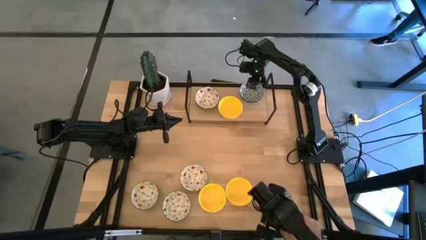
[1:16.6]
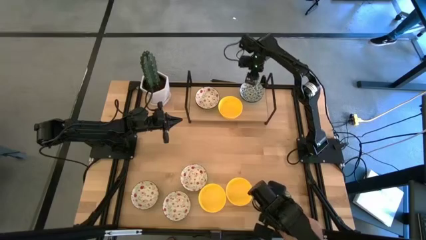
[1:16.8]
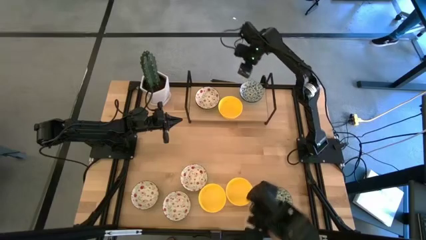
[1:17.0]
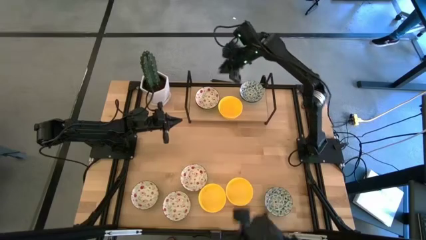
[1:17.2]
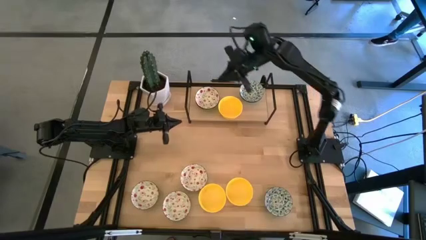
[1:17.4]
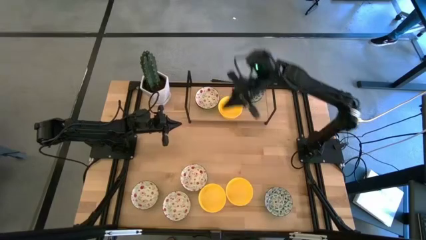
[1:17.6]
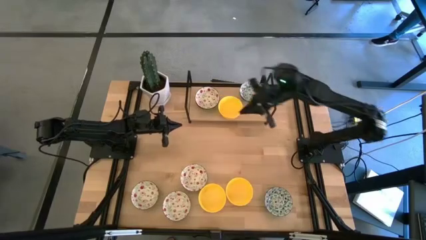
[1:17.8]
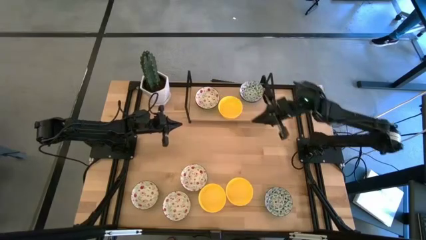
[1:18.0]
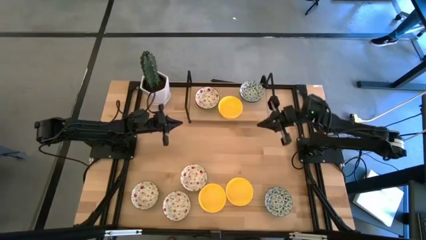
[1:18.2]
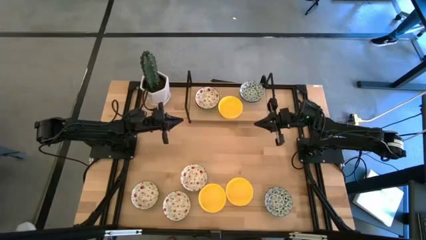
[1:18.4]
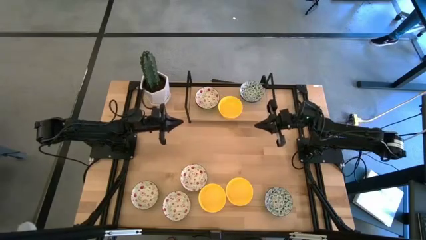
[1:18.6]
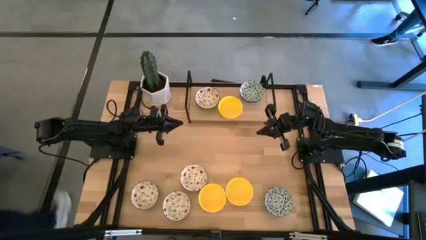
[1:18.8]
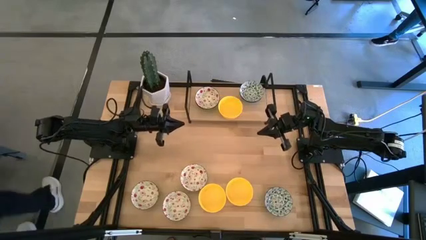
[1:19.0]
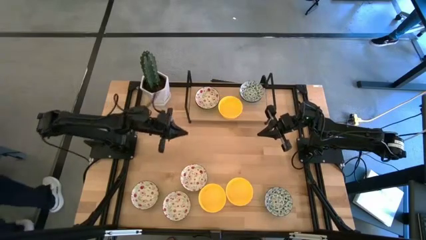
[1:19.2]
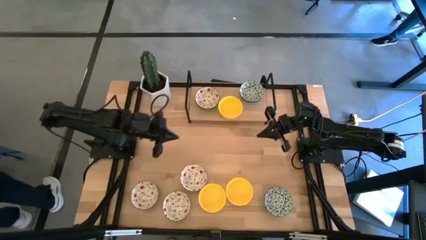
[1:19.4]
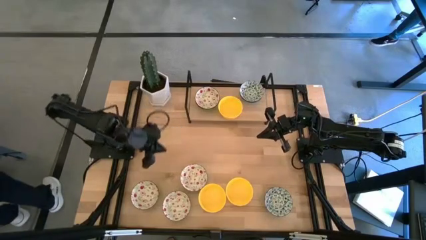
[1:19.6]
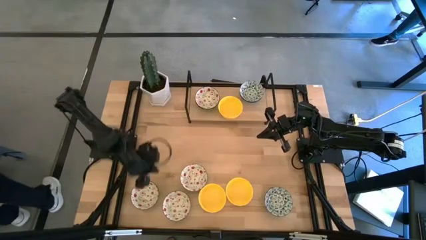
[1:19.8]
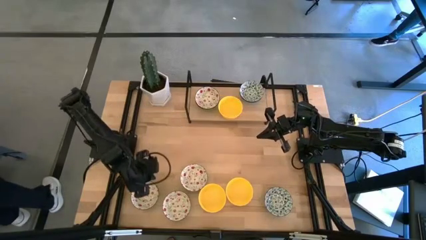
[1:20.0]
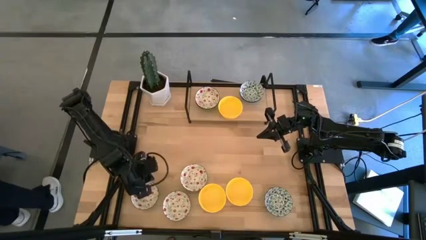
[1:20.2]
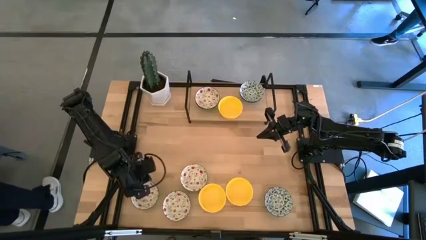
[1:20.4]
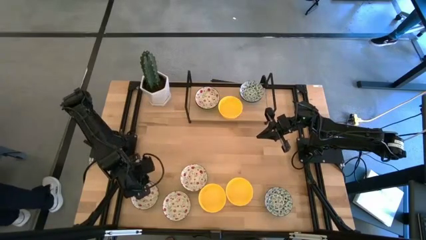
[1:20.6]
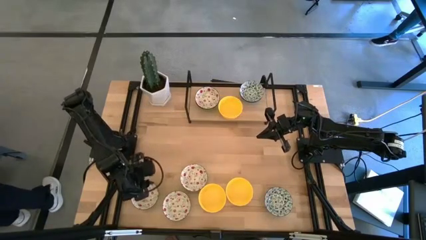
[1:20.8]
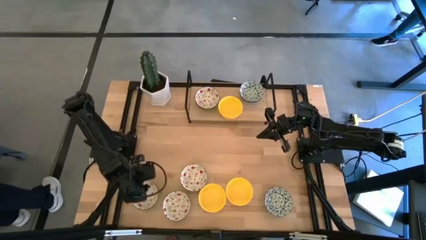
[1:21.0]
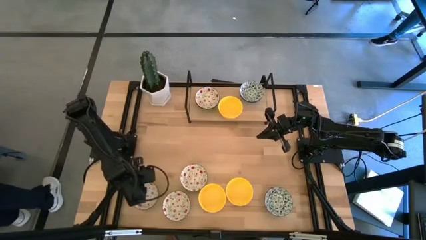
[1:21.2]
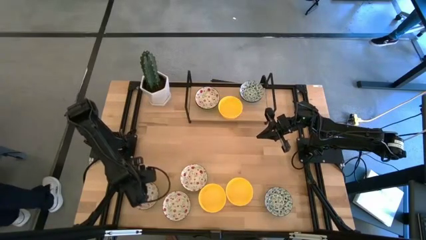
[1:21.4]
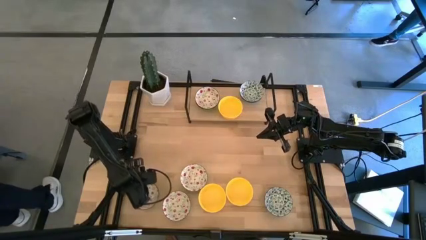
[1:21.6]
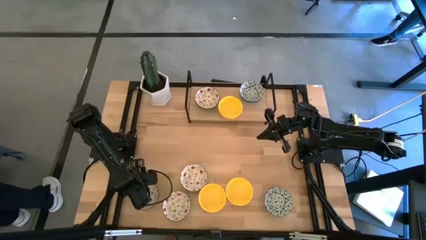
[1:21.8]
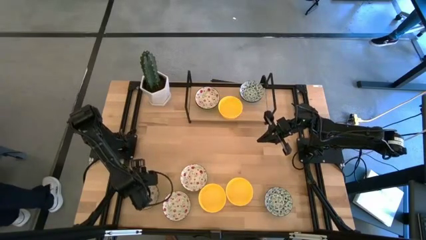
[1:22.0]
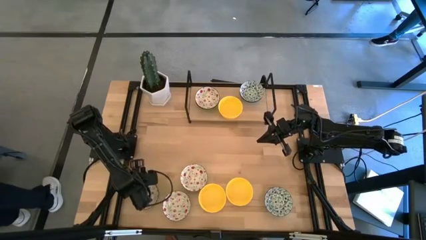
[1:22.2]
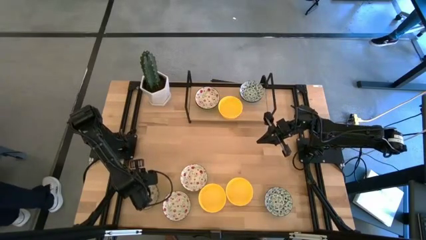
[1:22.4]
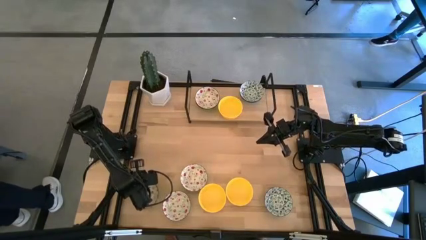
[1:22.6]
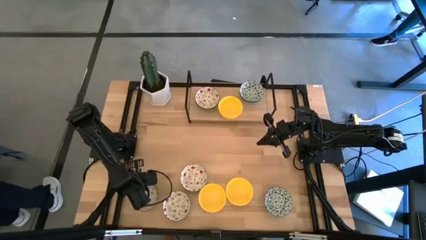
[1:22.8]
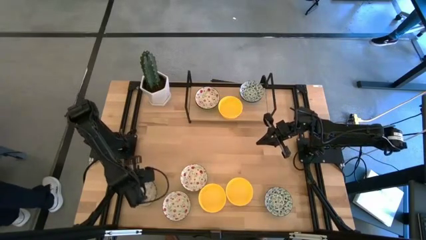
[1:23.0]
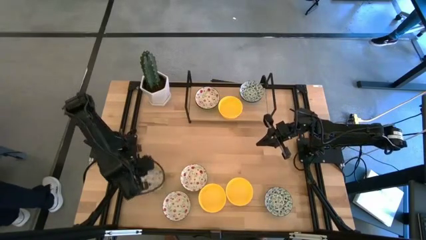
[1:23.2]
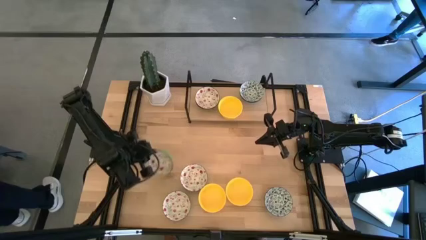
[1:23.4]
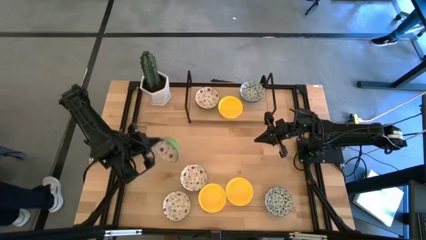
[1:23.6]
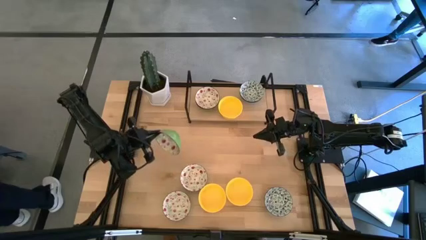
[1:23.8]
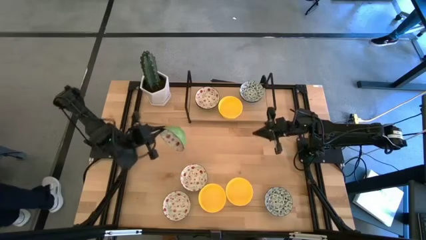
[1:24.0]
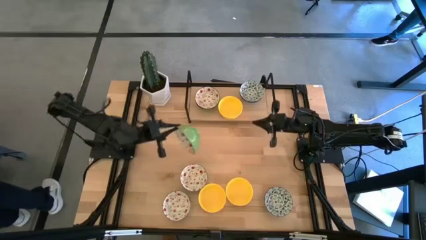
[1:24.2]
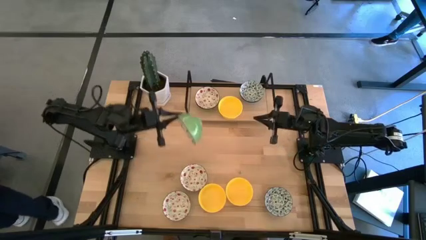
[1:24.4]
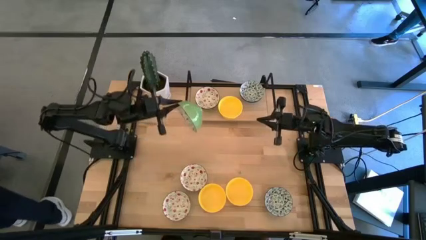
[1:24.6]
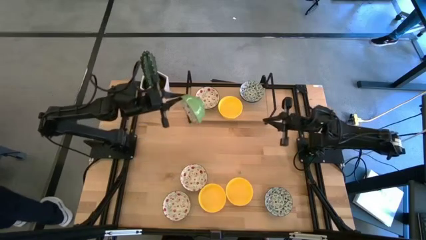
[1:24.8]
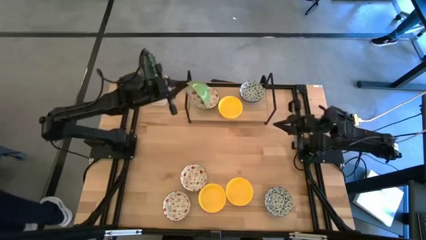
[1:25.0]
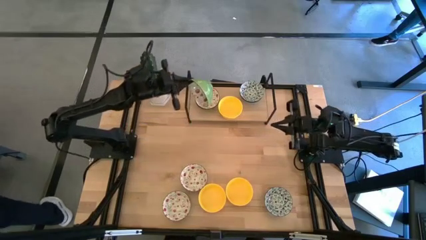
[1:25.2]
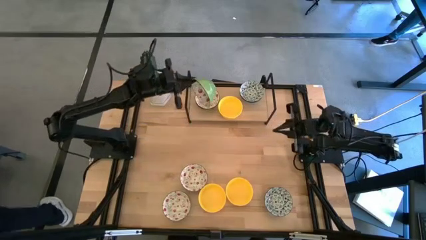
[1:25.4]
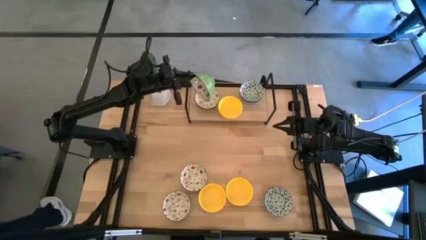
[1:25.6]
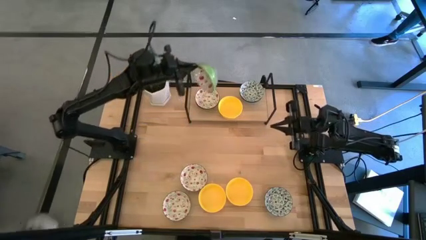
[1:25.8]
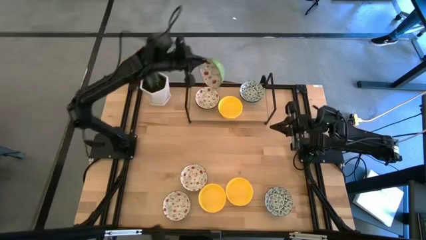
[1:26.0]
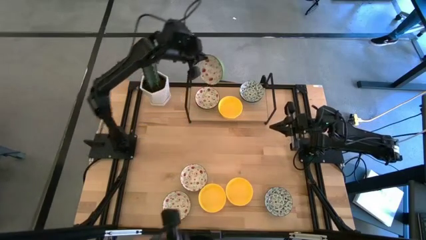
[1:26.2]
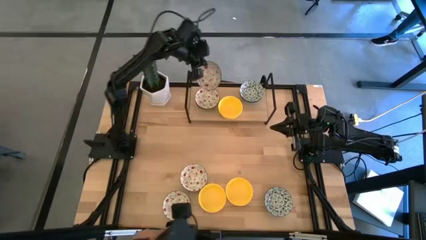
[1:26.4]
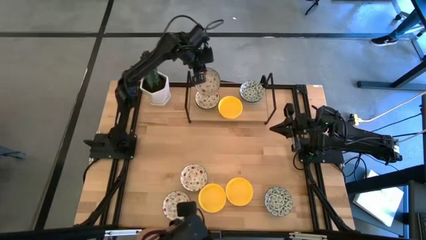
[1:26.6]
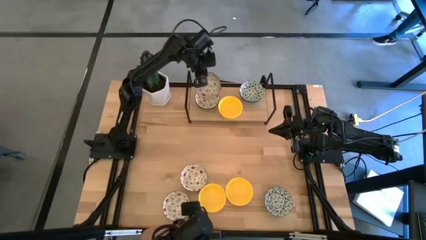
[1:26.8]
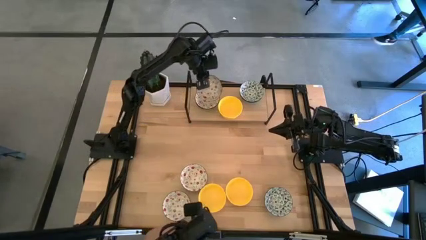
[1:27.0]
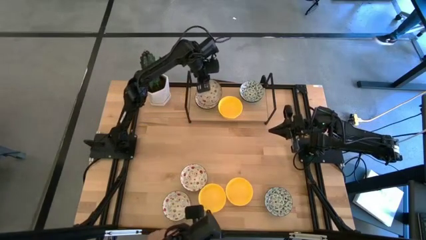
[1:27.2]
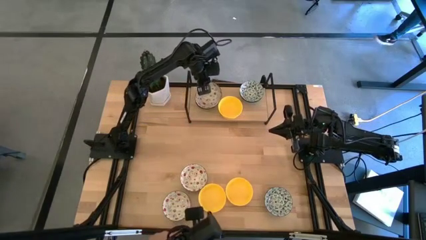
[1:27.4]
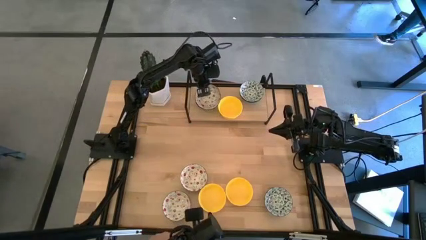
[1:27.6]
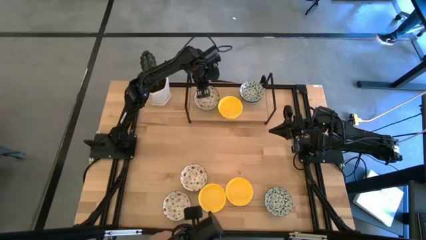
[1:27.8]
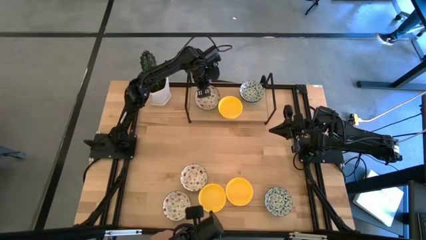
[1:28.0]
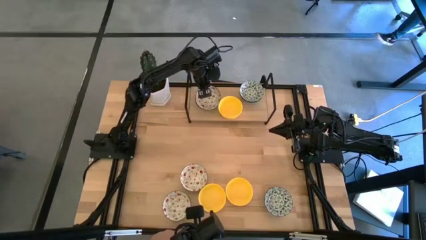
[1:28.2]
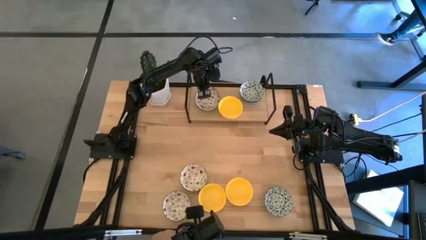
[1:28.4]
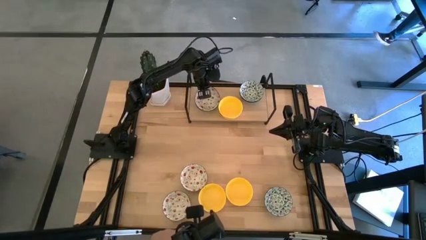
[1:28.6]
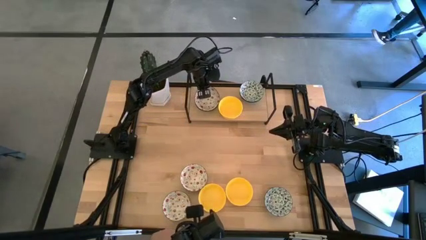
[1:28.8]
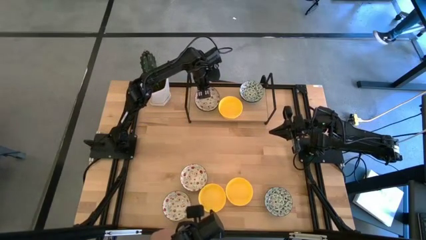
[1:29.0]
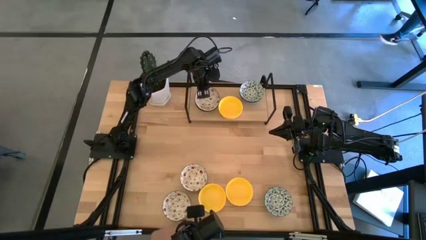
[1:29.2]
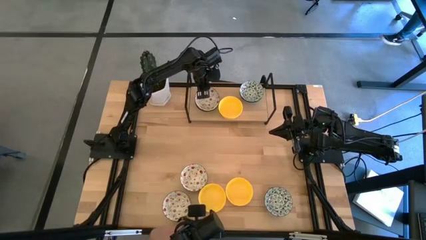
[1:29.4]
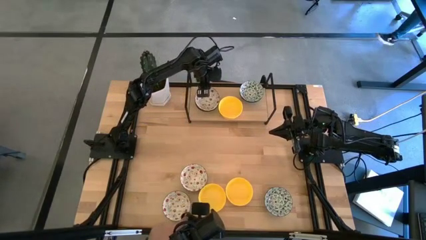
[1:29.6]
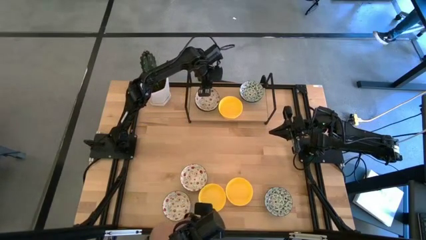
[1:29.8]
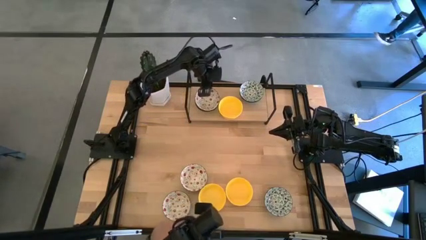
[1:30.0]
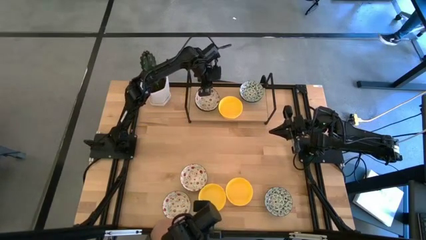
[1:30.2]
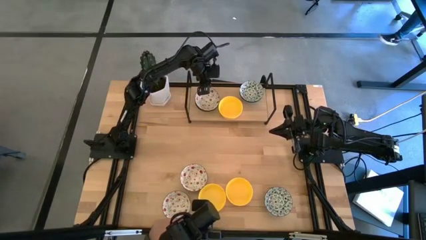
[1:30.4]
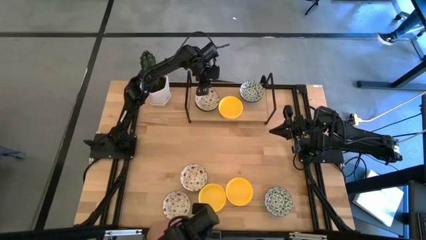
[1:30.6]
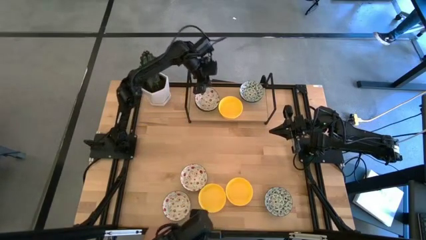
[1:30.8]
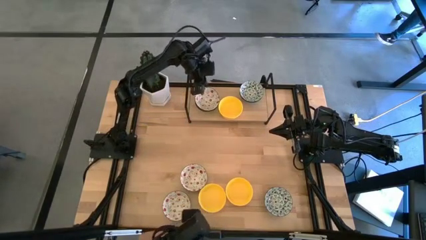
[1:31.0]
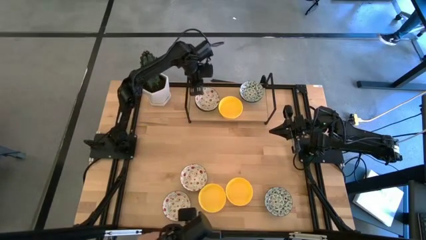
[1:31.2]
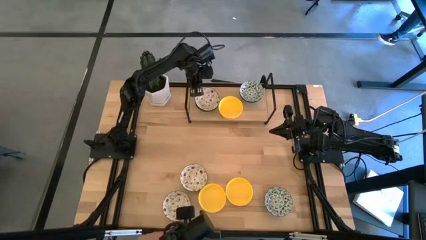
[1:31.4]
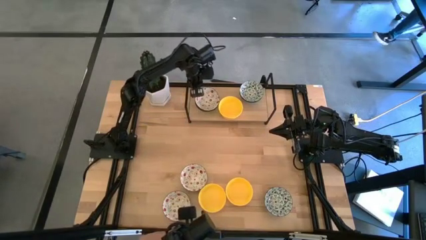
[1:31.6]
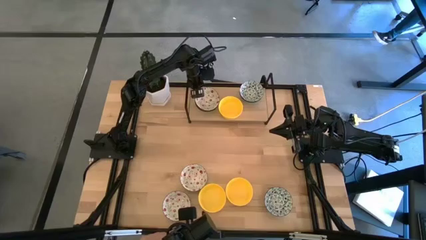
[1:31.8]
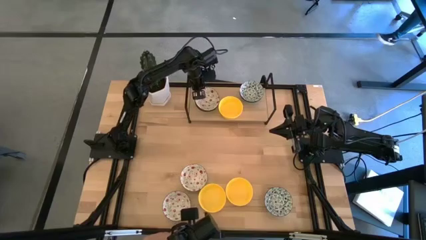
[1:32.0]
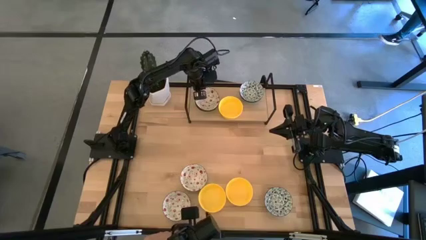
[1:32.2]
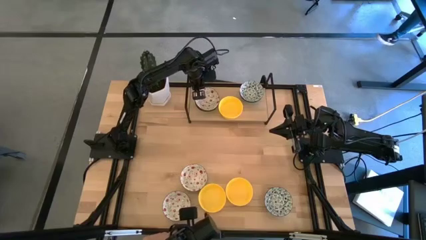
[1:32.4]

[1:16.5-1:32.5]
Task: Pick & Place Mini bowls
Stack the red green bowl on top of the red green bowl on the shelf
